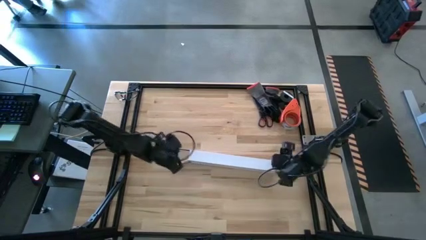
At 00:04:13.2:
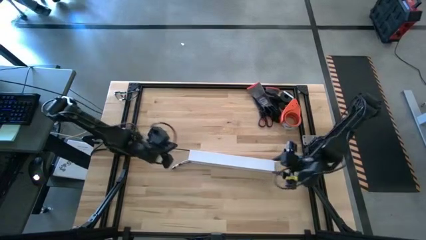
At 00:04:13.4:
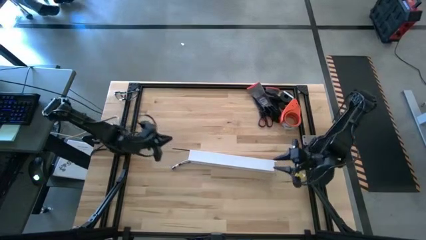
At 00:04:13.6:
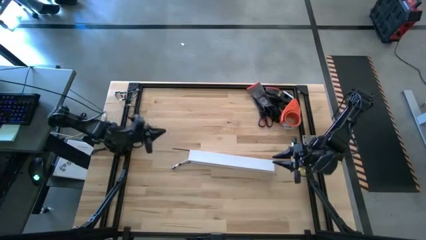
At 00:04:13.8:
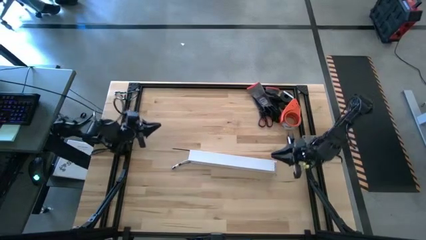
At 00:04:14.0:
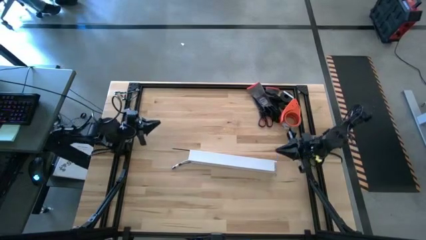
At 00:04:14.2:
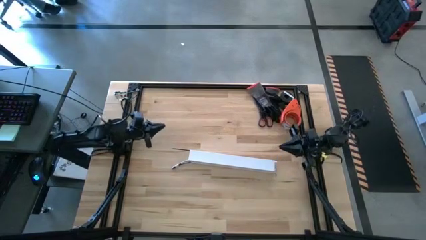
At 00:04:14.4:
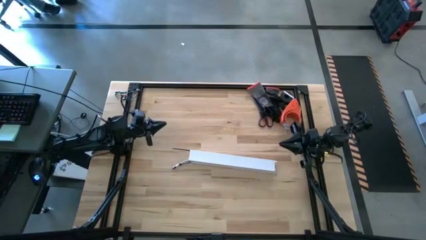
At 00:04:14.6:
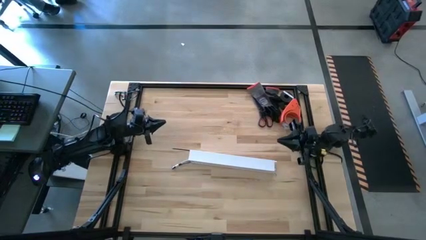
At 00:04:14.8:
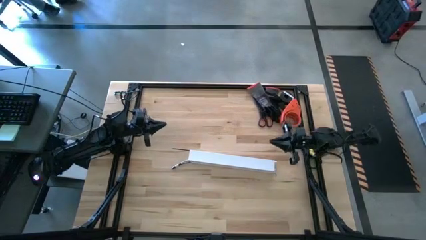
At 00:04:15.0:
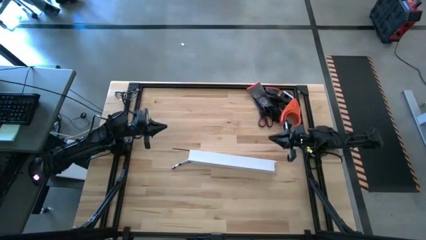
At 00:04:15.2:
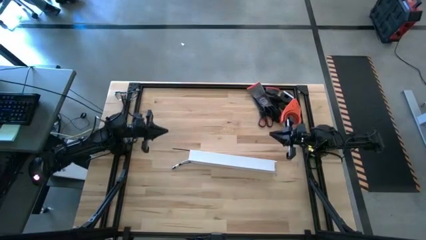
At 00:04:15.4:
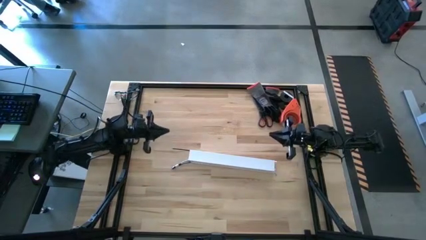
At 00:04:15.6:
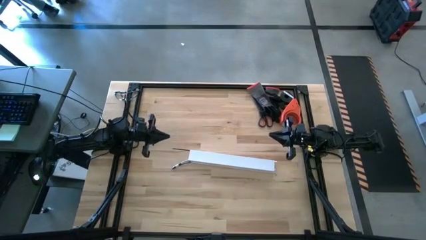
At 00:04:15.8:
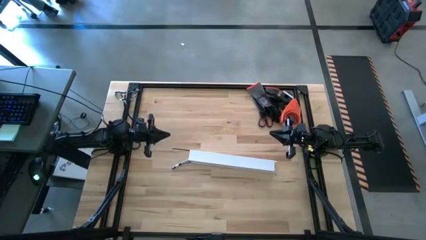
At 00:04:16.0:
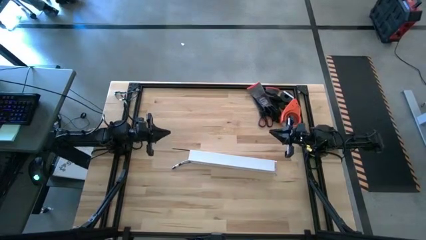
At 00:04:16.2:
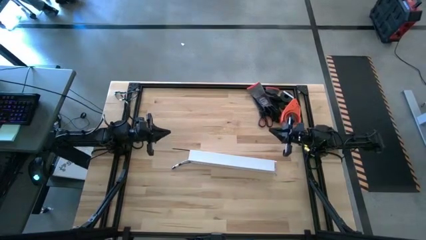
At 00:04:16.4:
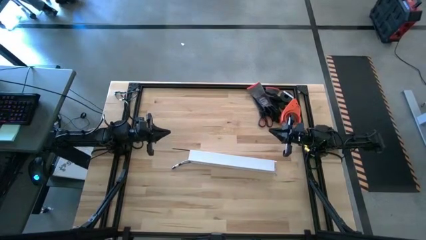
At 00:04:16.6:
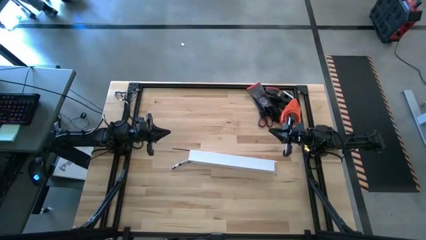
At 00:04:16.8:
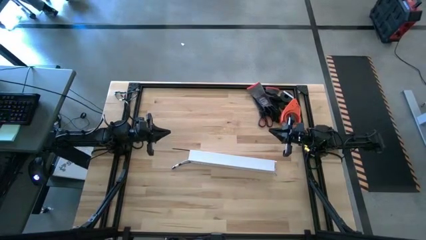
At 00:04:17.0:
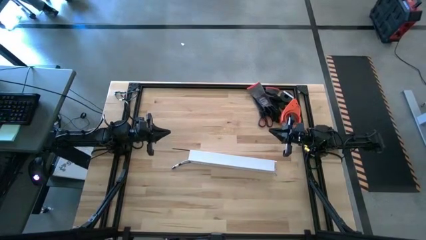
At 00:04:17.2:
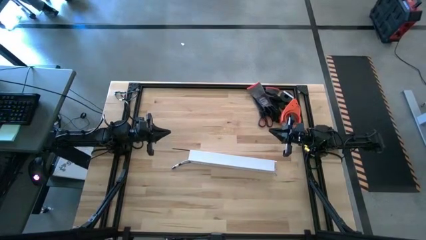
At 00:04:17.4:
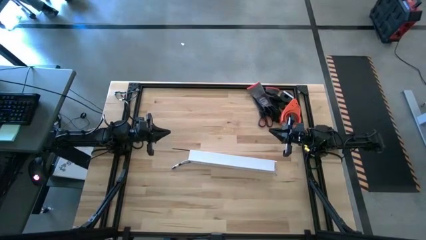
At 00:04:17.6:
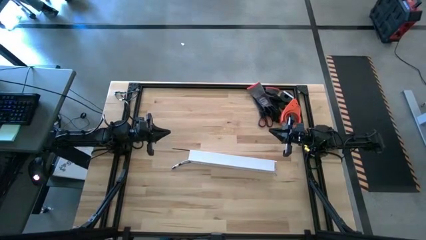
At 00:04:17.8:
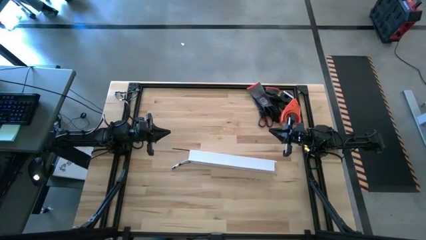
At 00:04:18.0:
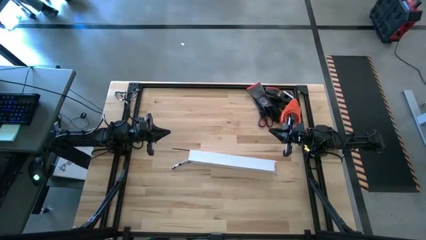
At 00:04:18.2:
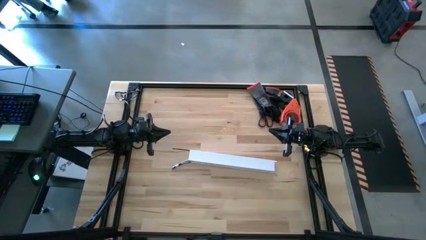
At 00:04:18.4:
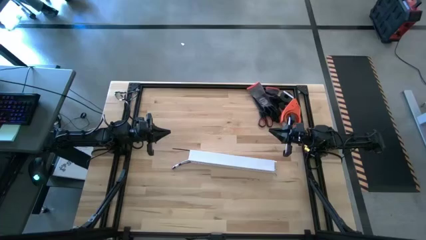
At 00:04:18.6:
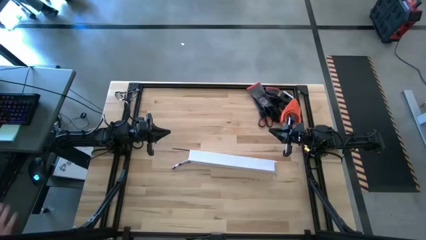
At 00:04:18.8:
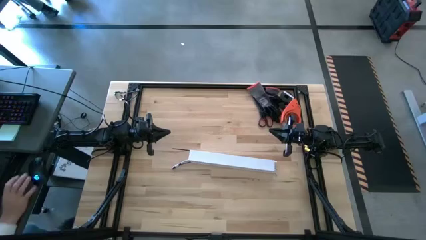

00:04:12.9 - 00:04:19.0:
Task: Ziptie cables
Return to home position

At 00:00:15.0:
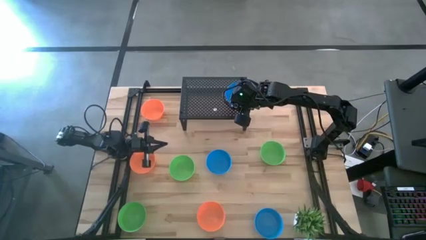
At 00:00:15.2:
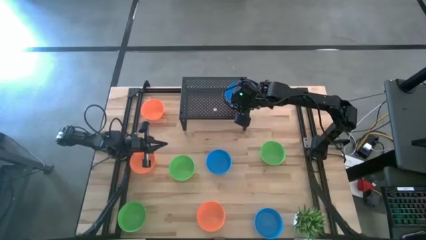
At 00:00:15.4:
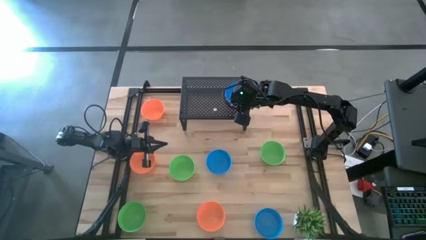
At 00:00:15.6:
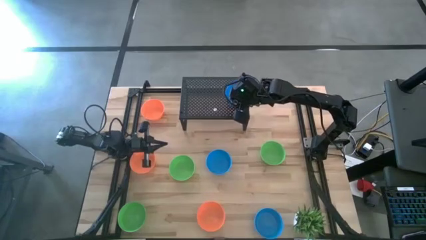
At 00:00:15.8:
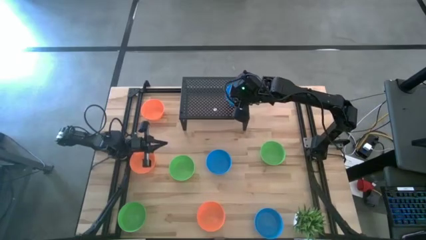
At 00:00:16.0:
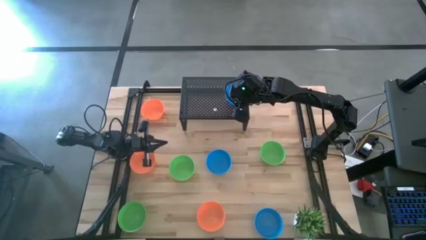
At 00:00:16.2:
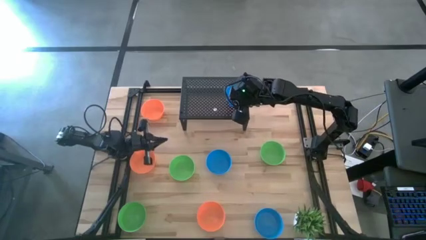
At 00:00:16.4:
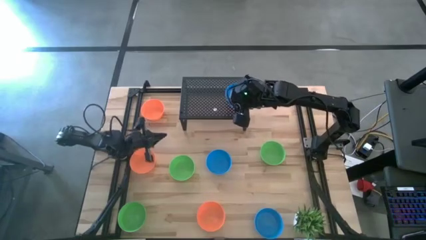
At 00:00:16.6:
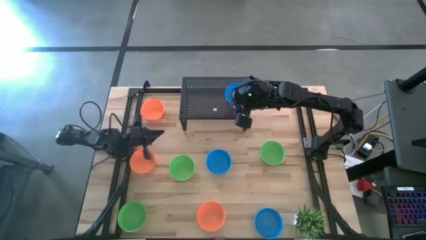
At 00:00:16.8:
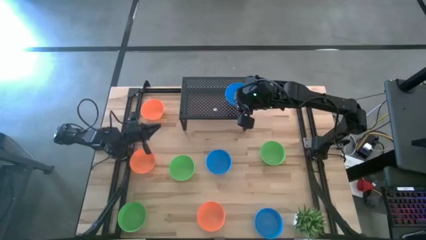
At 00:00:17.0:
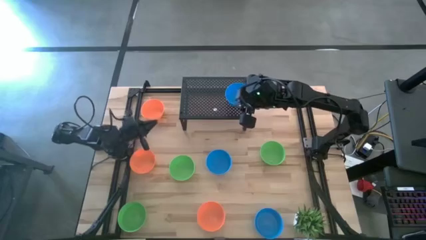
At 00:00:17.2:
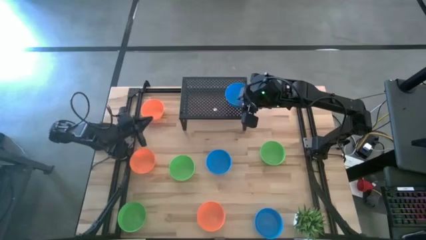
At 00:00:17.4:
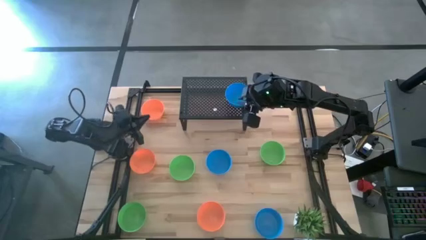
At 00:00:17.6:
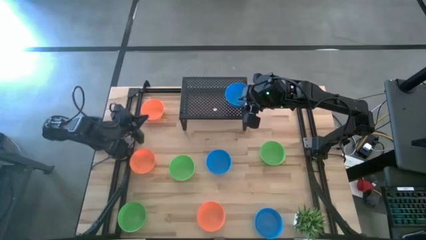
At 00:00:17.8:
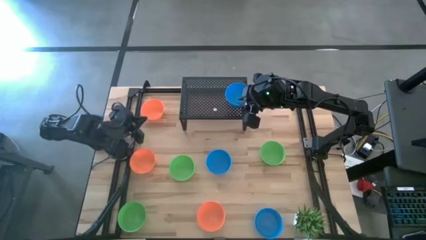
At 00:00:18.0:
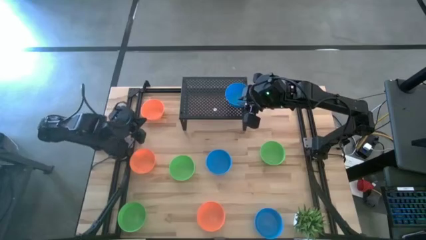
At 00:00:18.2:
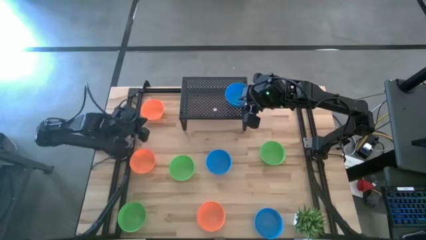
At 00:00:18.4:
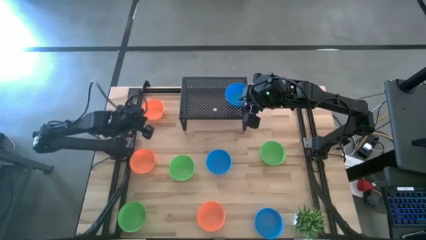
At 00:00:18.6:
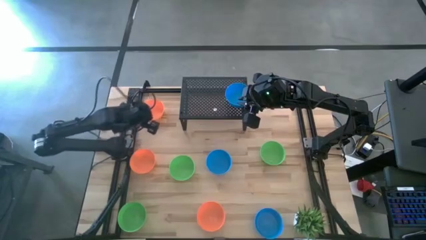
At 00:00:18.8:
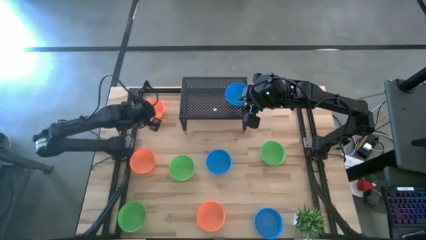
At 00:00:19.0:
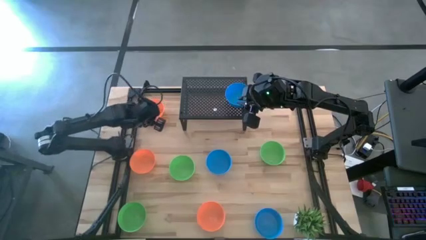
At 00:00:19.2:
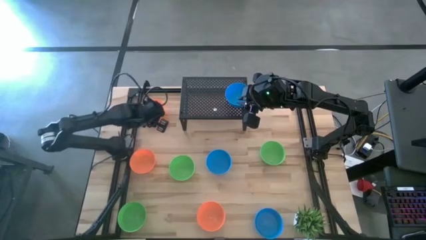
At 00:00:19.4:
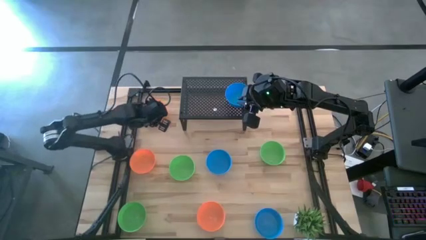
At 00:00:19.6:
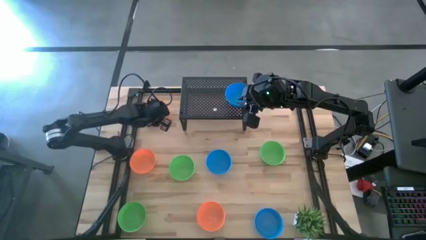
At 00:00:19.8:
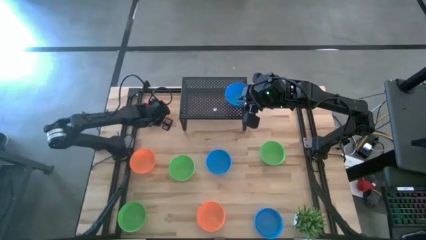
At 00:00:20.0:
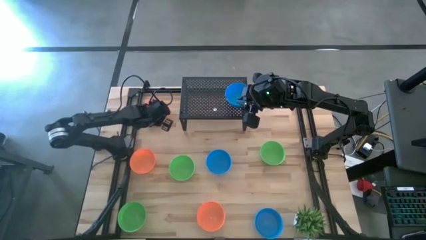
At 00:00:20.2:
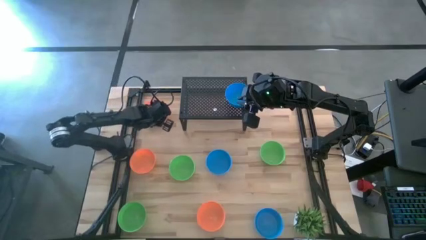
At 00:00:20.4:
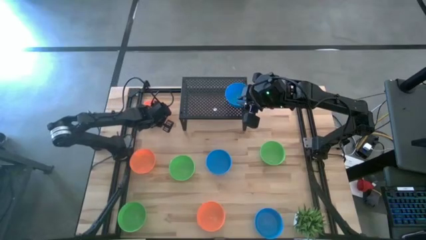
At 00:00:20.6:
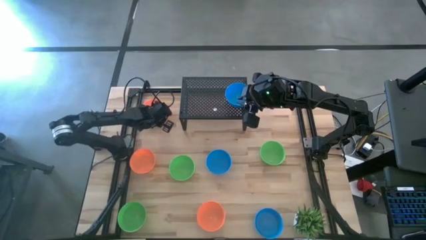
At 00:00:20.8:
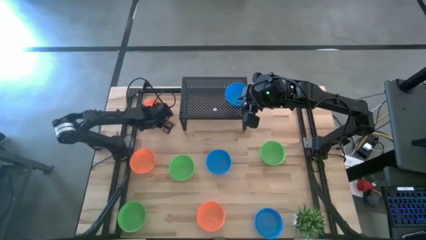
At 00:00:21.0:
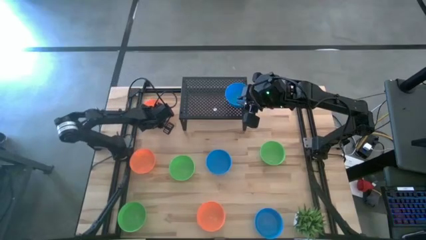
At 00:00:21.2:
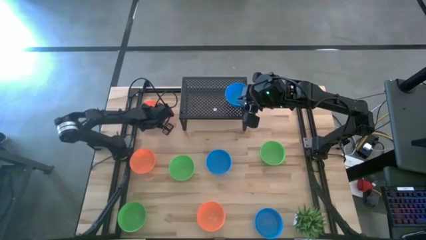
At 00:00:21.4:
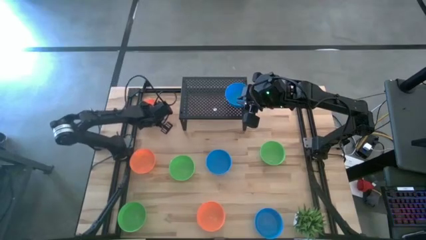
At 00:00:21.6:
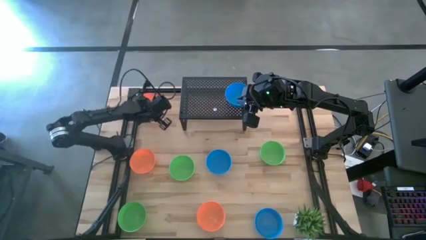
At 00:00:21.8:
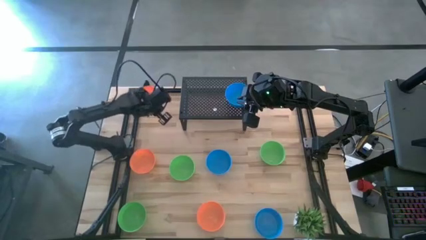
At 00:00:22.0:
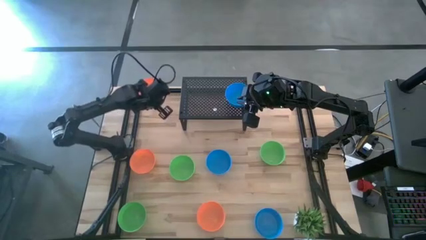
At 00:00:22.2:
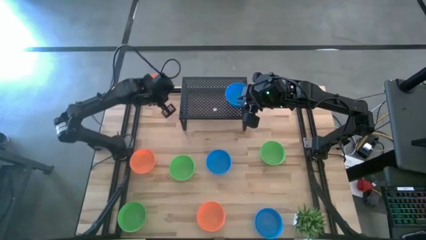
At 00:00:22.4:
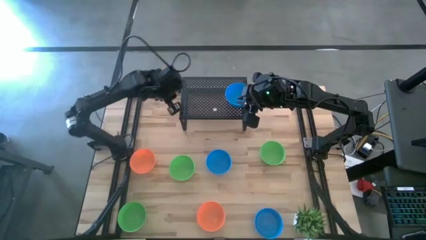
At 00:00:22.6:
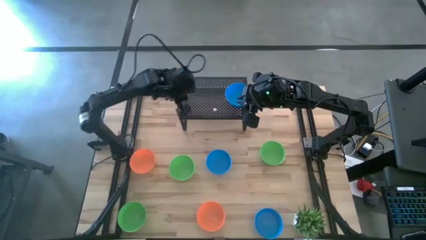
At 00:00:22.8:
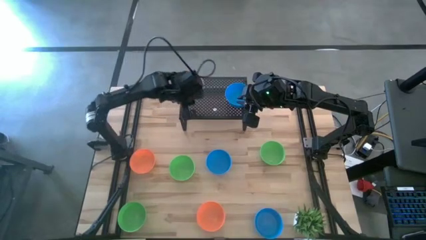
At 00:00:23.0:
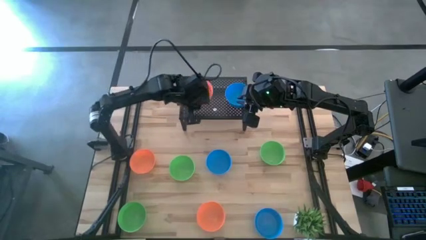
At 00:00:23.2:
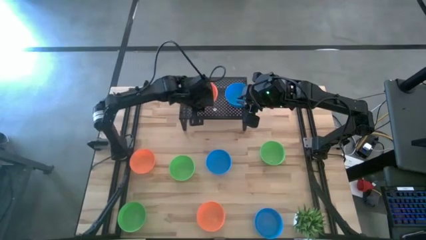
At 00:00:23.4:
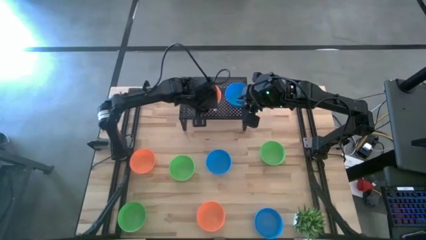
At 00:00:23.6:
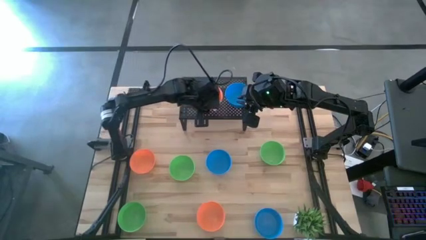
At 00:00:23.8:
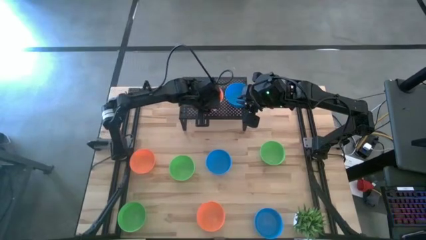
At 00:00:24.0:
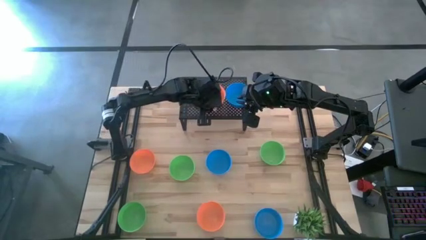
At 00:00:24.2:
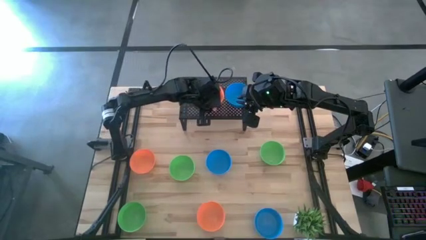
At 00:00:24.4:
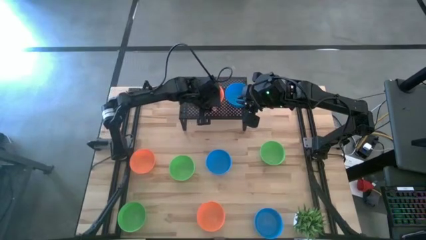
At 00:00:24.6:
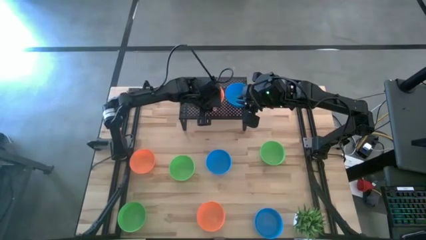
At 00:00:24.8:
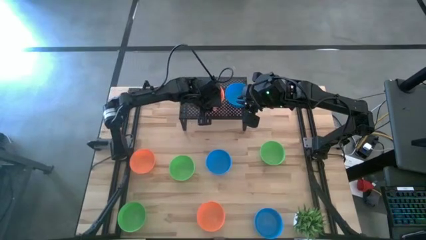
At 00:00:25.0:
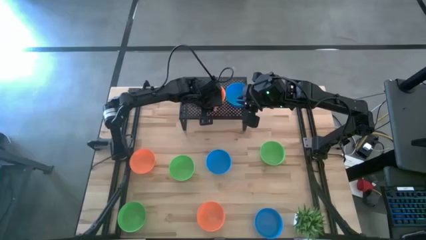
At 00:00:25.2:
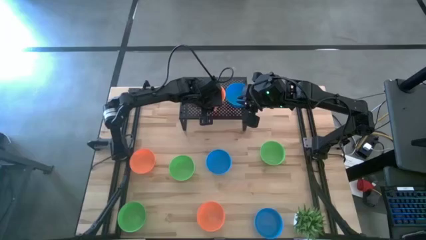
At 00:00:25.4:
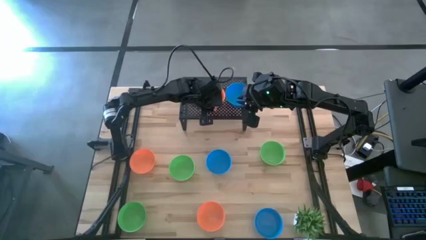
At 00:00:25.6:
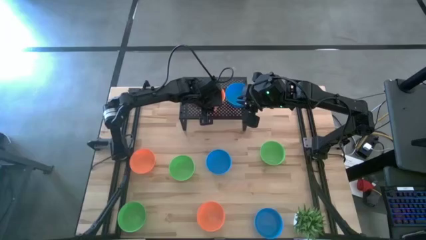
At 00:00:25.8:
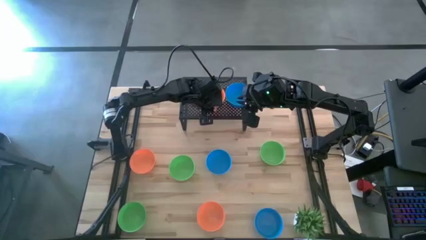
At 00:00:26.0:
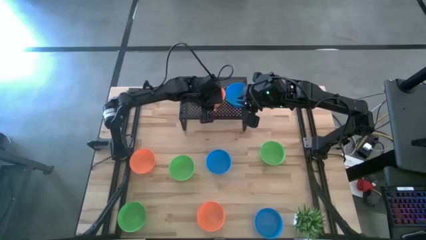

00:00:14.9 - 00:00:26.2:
Task: Pick & Place Mini bowls
Put the top orange bowl on the shelf
